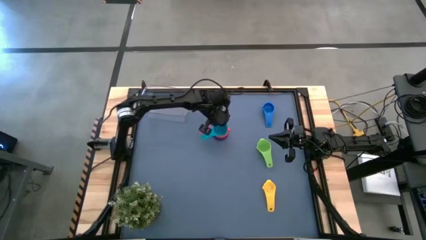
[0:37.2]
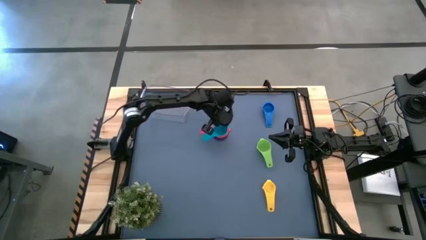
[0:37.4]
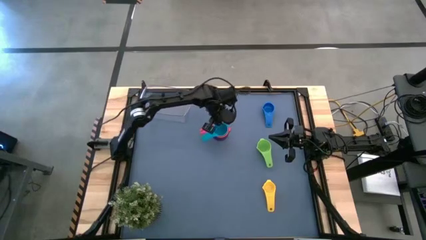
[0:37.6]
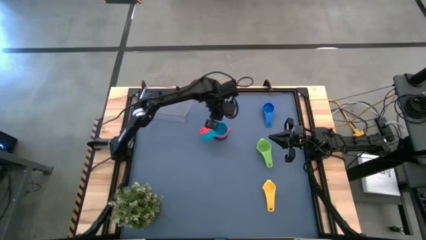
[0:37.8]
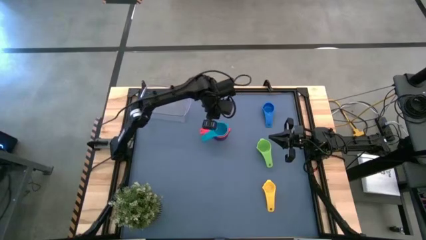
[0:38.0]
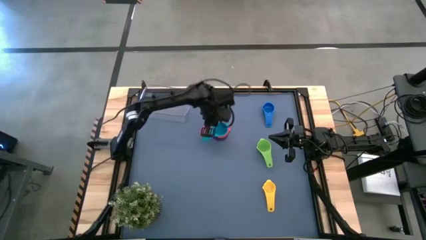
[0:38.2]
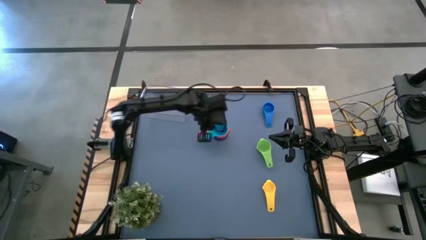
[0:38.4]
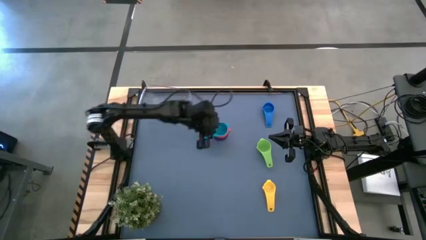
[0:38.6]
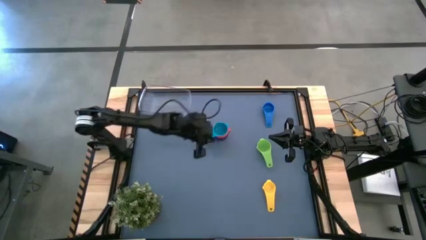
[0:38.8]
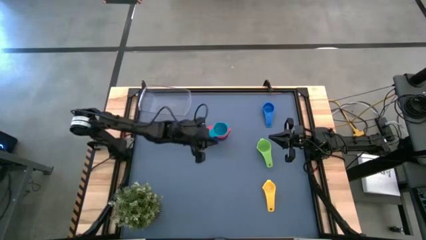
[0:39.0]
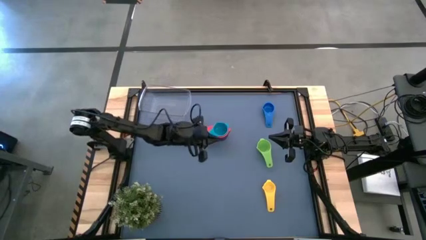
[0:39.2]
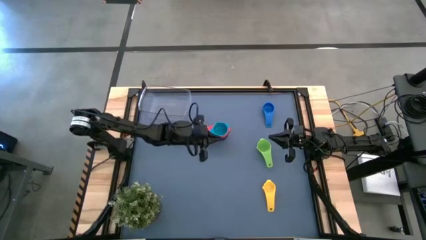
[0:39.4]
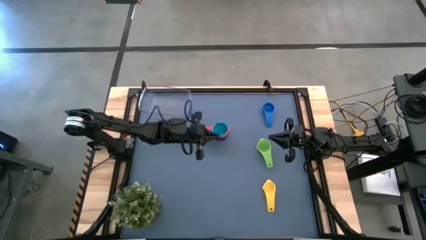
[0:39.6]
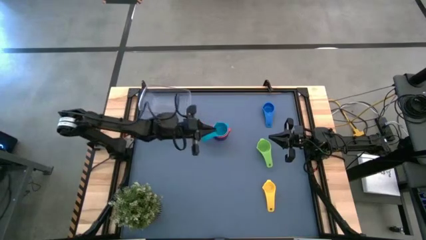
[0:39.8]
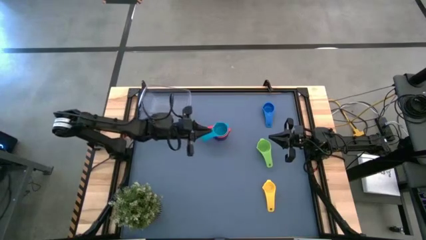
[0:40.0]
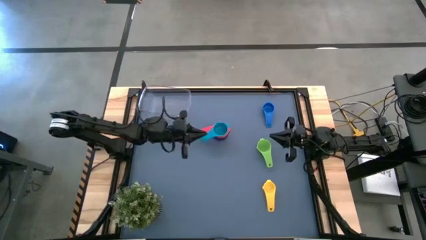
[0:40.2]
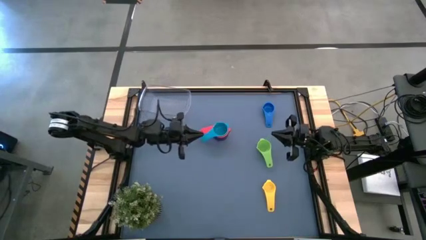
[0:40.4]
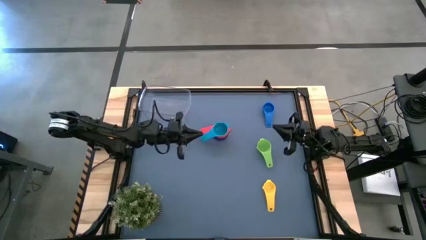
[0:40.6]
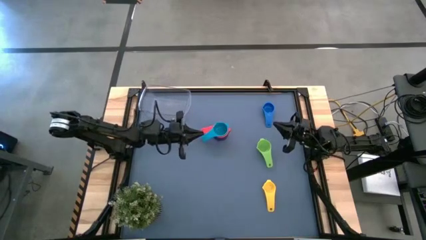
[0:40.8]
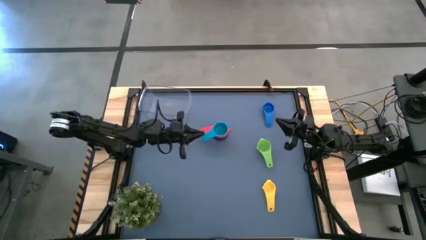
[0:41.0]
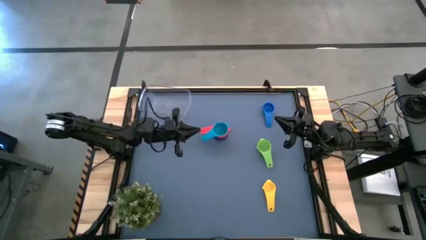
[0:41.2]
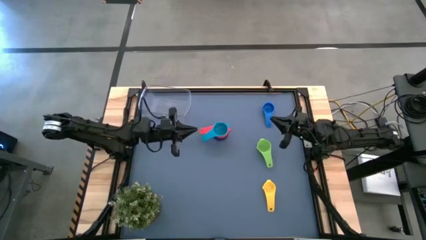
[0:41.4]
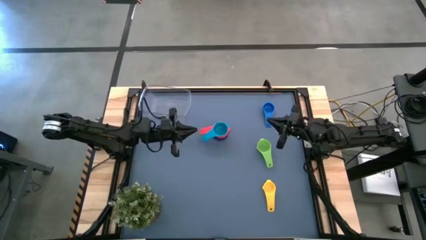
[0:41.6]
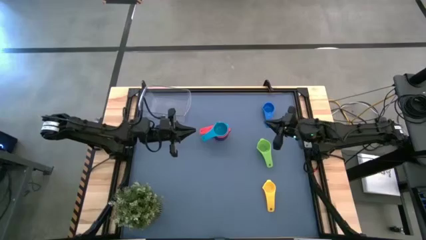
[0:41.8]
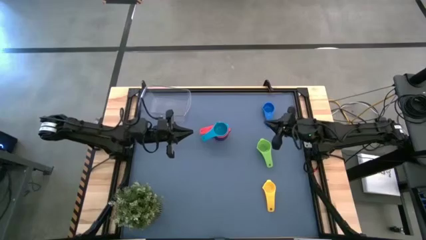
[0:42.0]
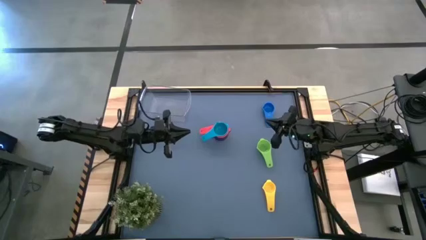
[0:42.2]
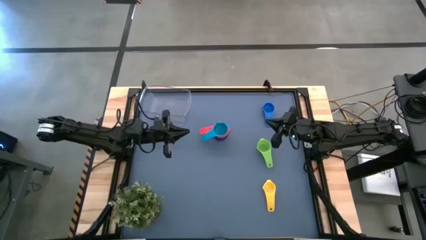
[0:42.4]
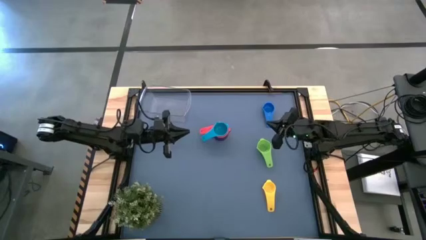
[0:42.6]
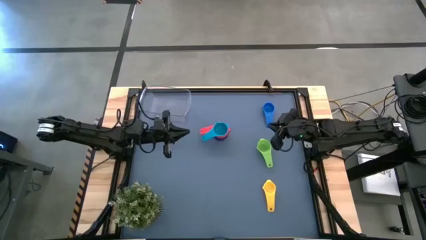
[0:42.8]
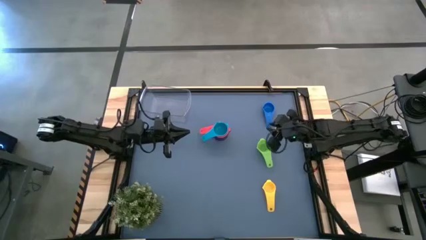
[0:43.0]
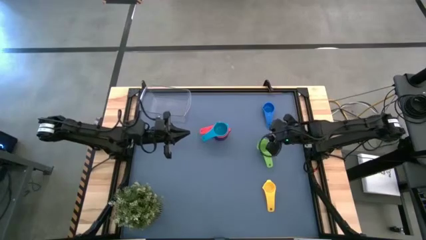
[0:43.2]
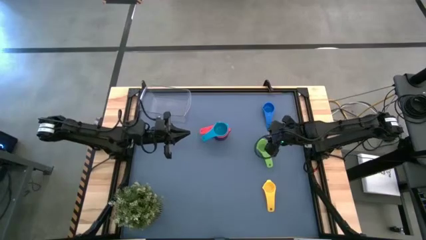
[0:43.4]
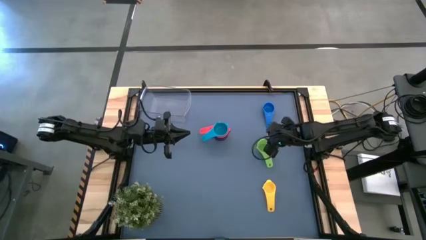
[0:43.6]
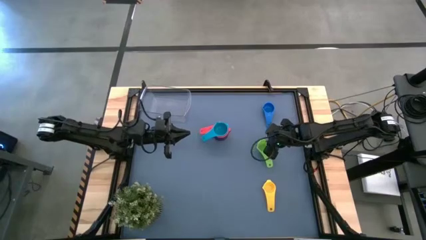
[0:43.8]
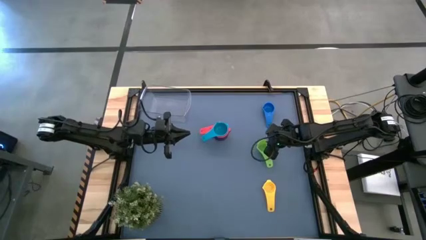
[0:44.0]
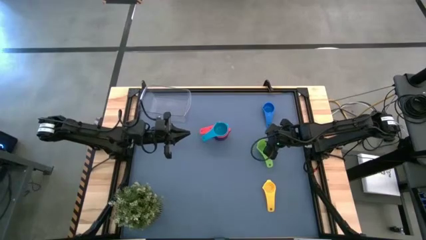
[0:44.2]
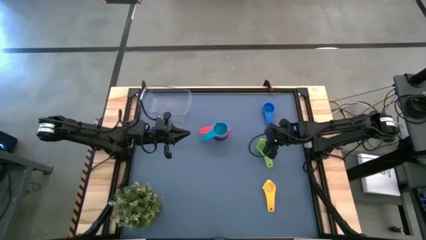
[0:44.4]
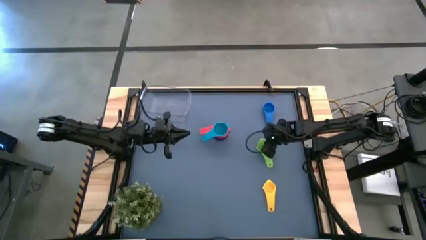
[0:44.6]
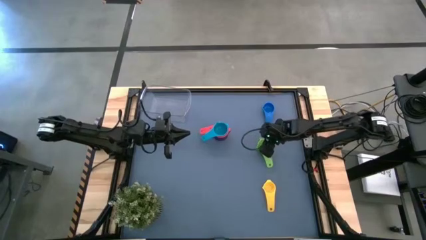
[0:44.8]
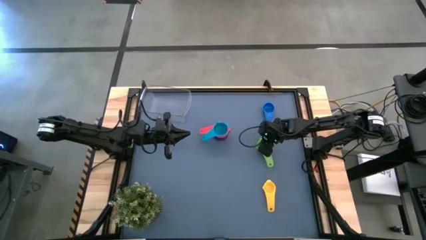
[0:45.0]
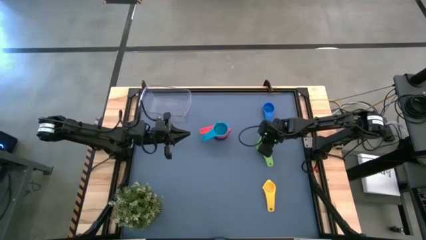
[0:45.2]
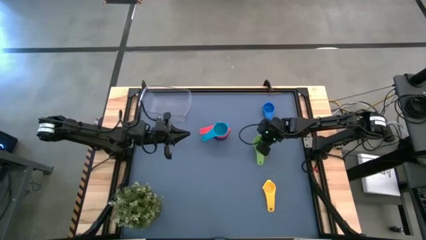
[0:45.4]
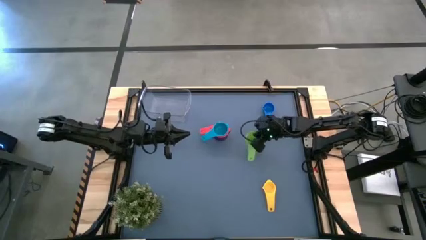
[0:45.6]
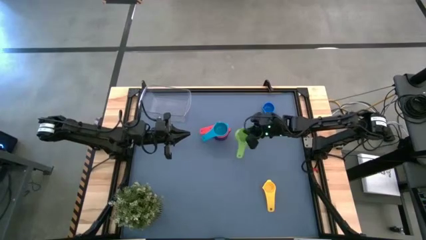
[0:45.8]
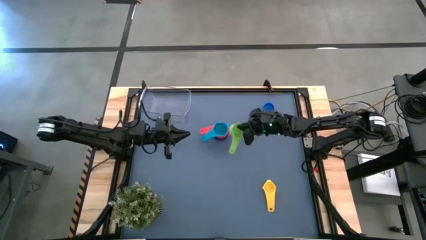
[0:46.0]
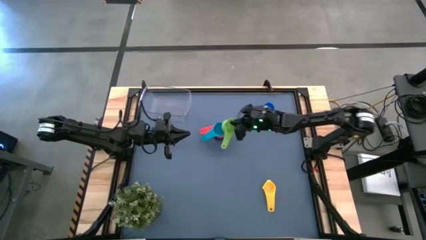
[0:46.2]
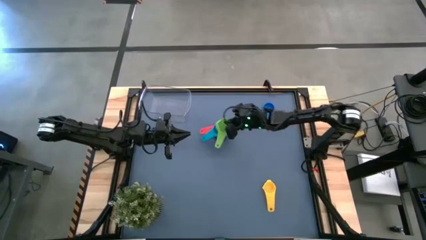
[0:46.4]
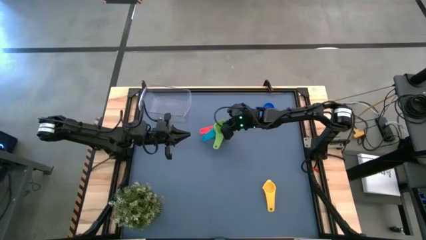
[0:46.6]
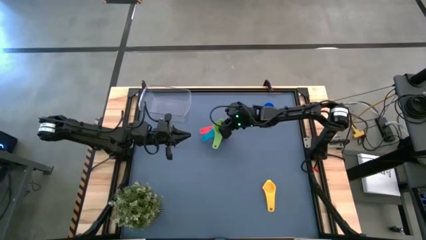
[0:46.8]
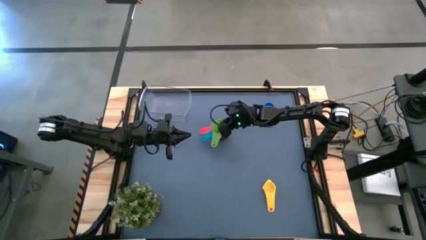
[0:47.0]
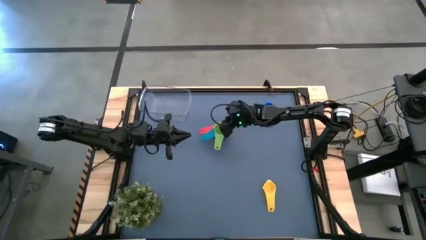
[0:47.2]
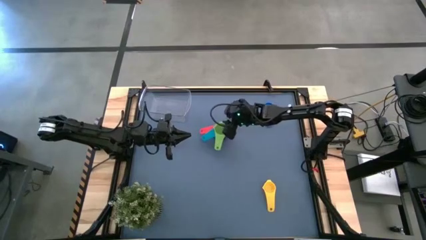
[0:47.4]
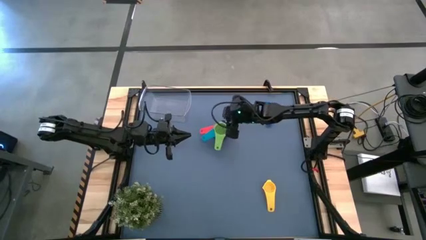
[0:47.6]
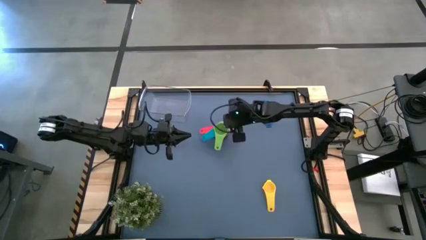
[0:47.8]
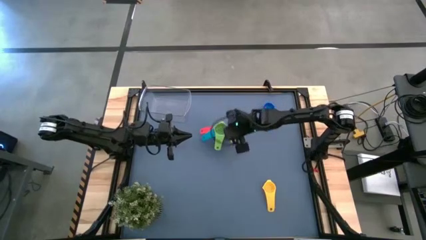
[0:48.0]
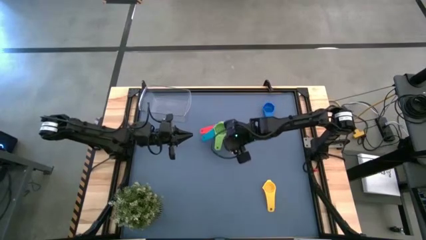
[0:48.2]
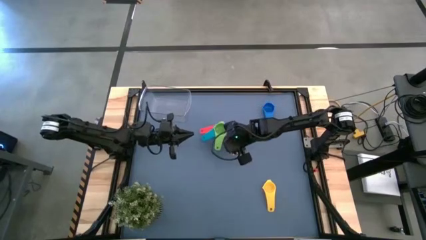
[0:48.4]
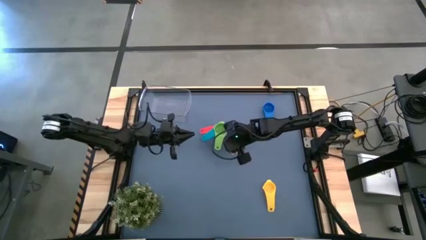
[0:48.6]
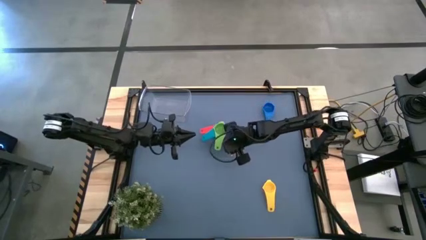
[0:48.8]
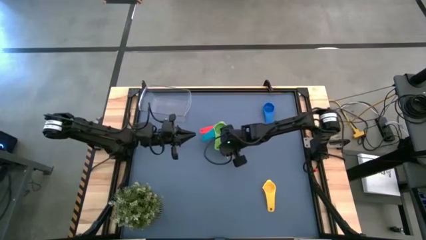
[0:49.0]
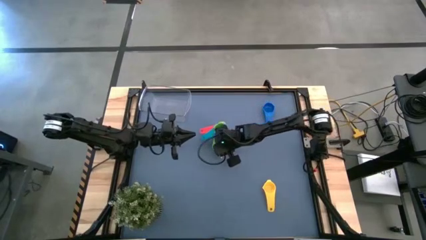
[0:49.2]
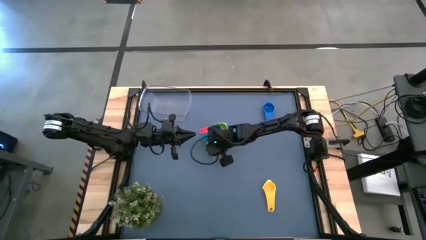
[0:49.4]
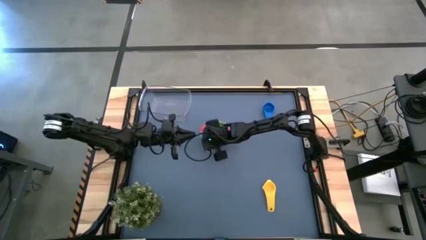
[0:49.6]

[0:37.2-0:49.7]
Task: Nest measuring cups in basket
Stack the green measuring cup on top of the light blue measuring cup

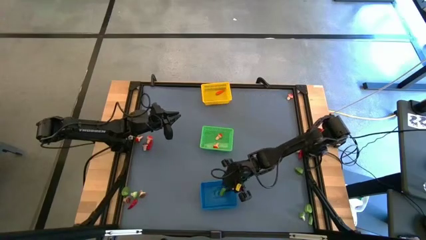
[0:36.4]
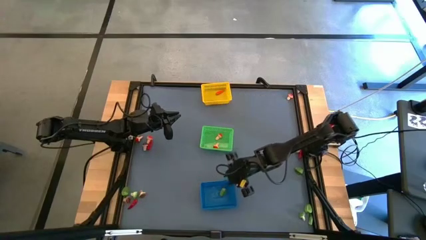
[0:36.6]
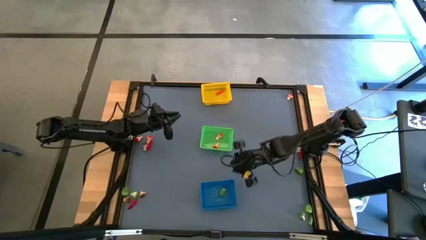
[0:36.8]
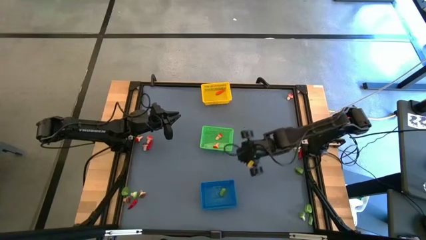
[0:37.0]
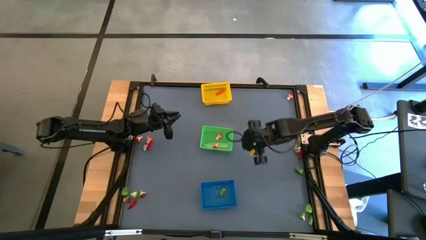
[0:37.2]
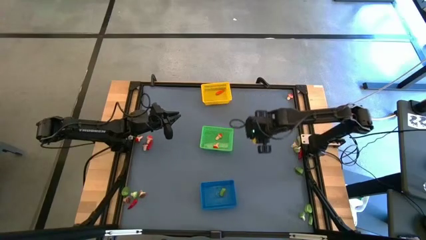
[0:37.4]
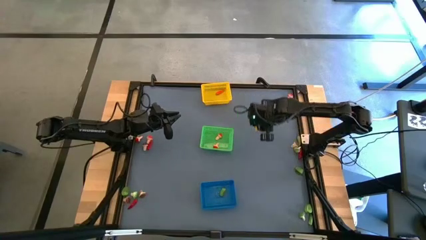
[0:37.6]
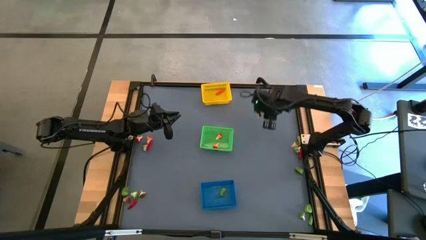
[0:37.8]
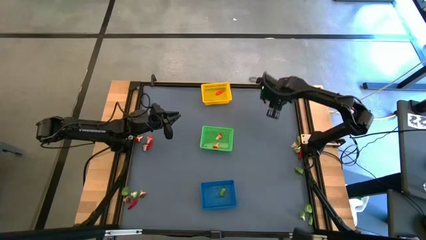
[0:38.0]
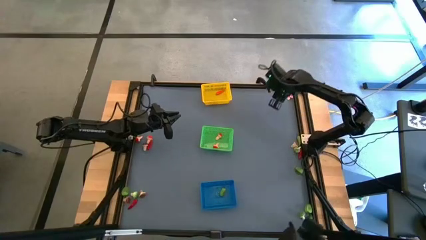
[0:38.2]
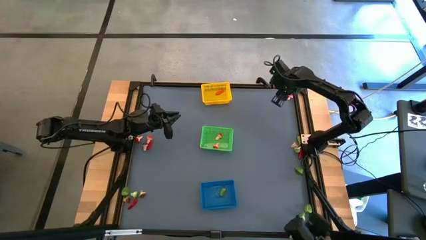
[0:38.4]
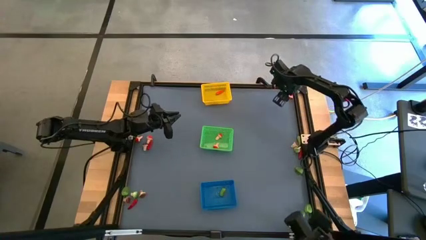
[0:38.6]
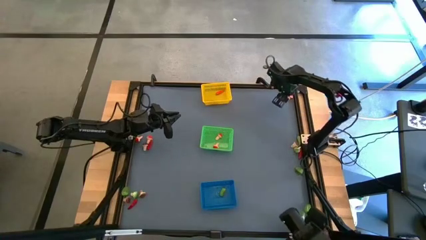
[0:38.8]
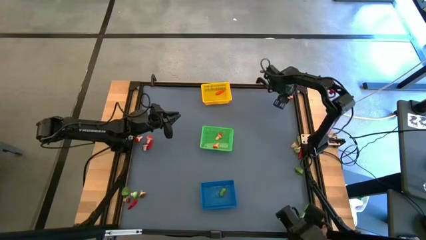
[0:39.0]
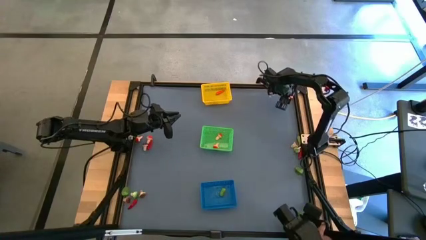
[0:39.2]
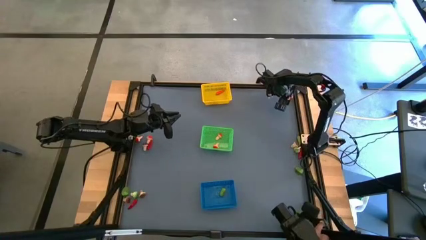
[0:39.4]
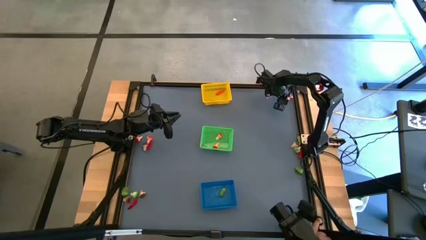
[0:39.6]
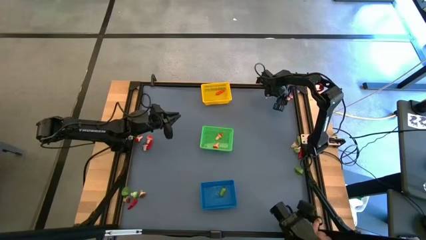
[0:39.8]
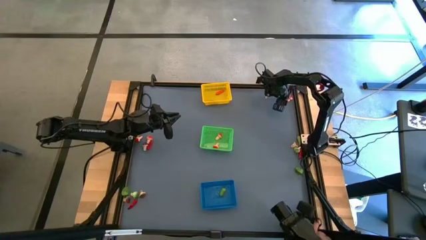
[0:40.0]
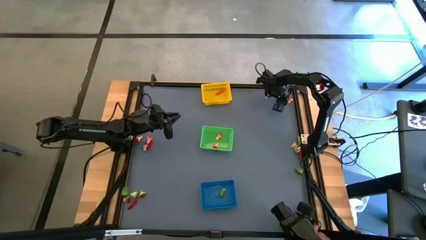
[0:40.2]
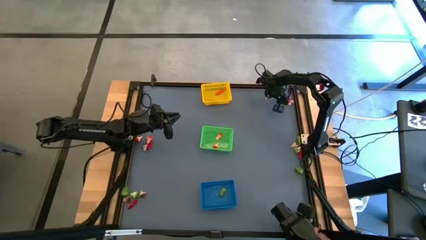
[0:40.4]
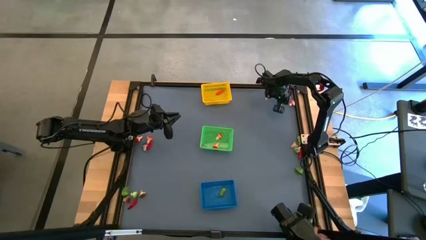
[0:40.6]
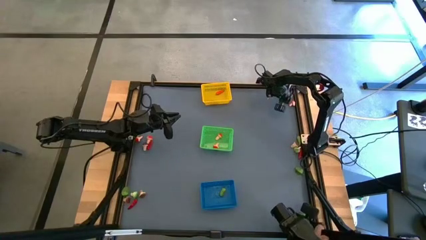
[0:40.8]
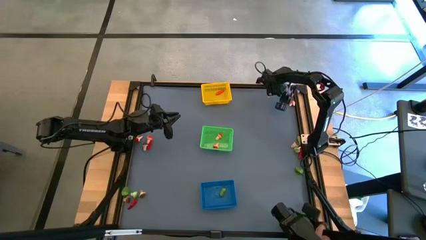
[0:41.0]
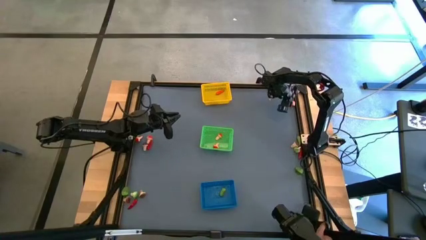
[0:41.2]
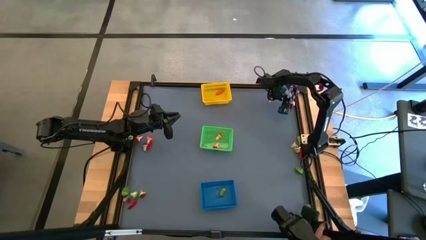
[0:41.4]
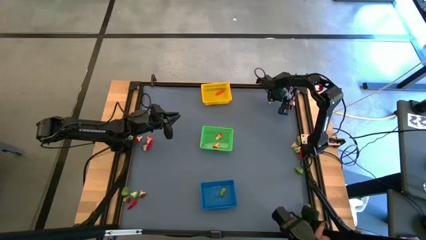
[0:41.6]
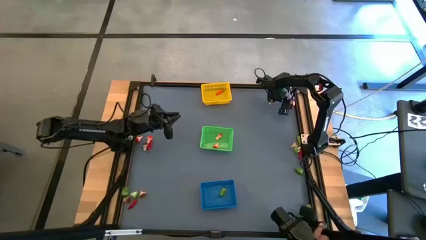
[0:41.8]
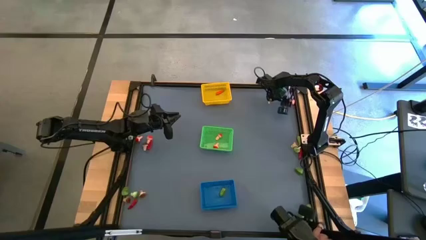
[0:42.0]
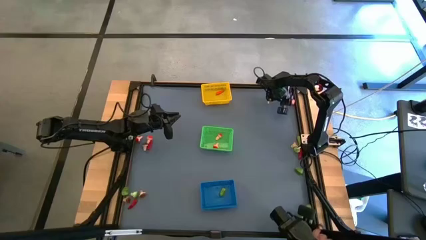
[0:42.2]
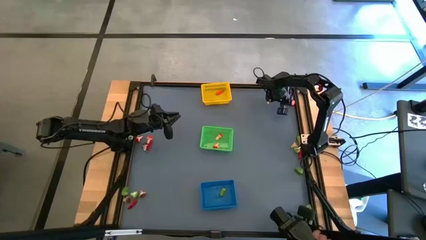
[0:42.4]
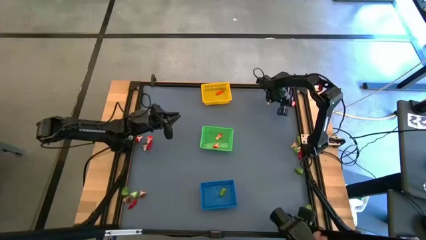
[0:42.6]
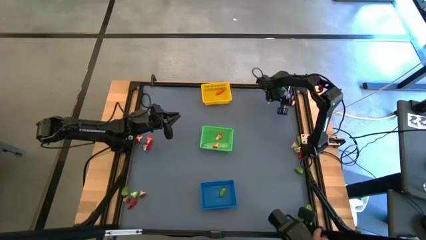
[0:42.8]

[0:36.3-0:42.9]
Task: Sort produce into baskets
Put the red mushroom into the green bin
